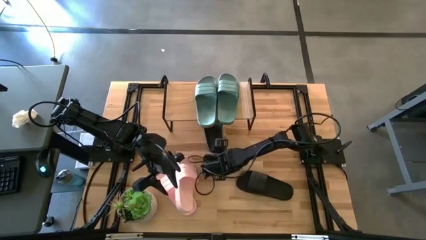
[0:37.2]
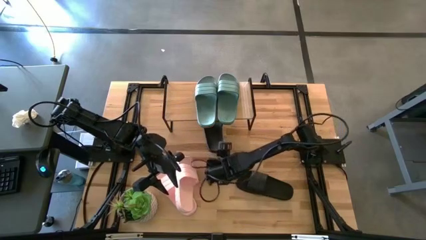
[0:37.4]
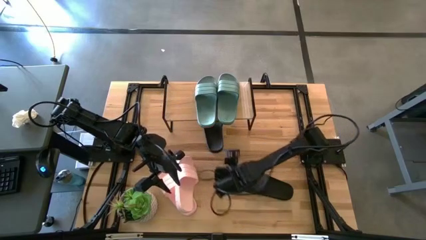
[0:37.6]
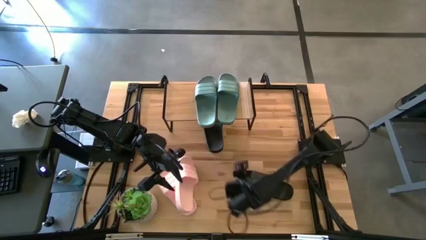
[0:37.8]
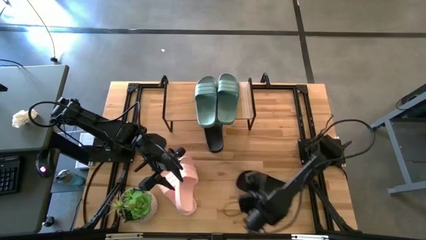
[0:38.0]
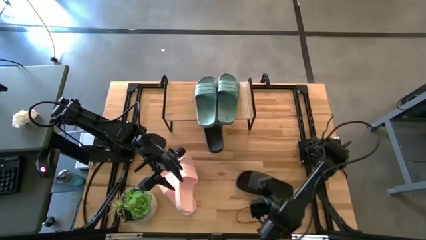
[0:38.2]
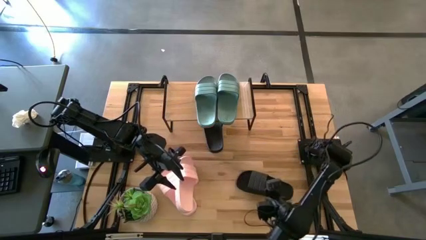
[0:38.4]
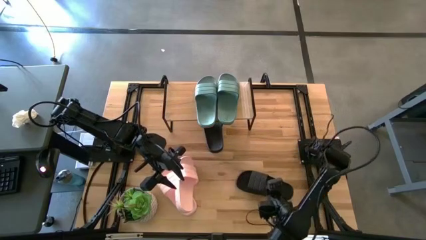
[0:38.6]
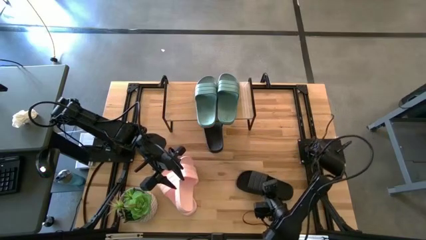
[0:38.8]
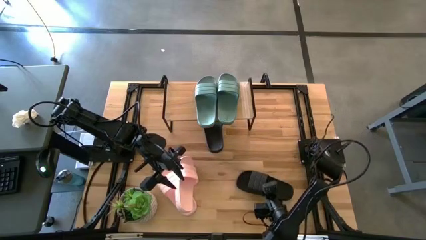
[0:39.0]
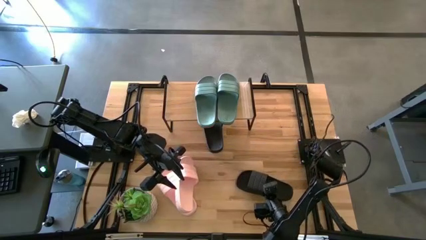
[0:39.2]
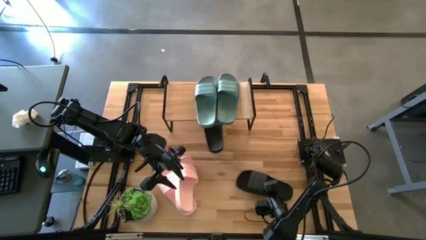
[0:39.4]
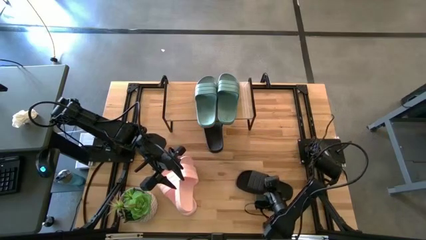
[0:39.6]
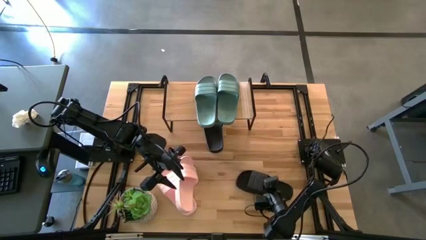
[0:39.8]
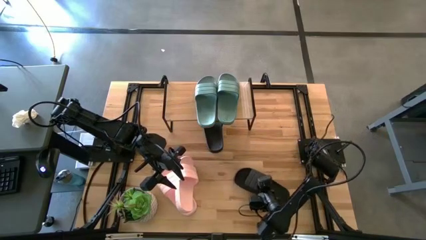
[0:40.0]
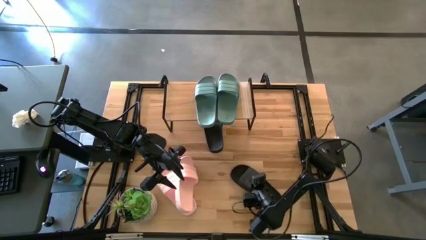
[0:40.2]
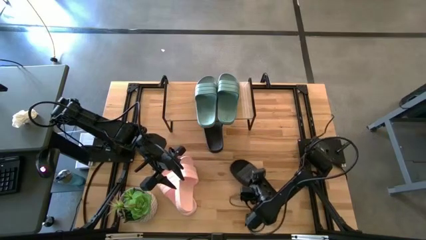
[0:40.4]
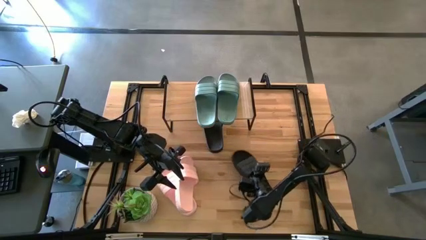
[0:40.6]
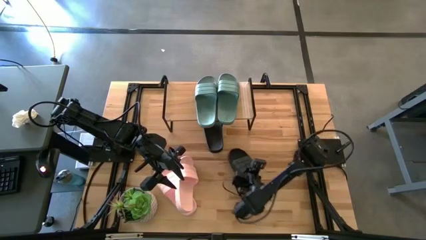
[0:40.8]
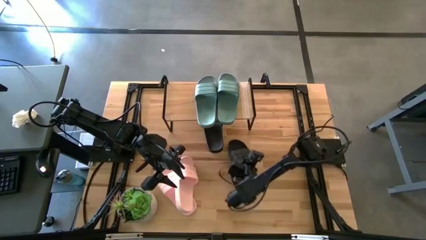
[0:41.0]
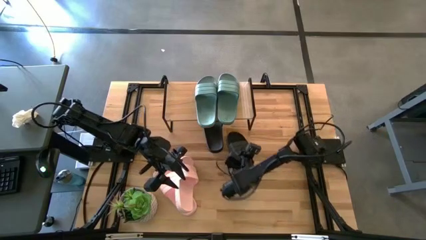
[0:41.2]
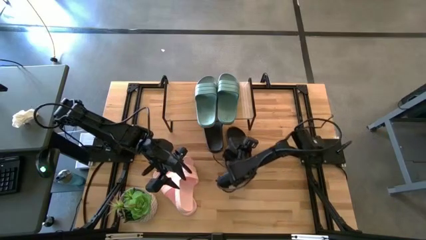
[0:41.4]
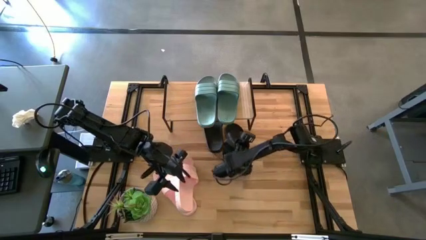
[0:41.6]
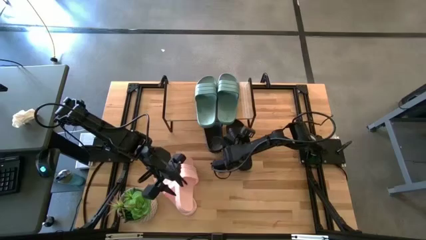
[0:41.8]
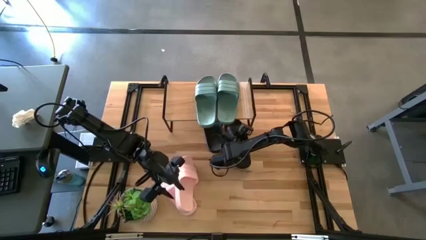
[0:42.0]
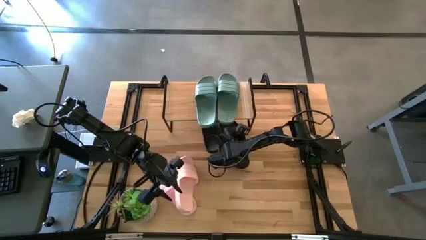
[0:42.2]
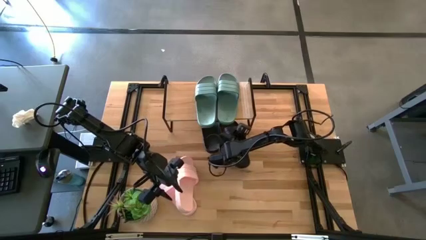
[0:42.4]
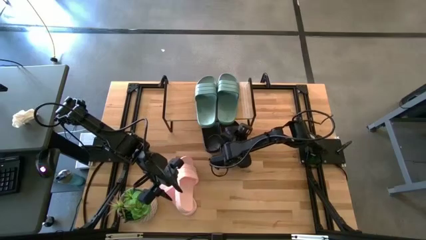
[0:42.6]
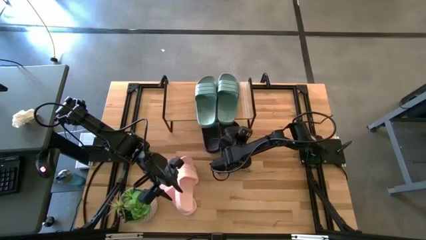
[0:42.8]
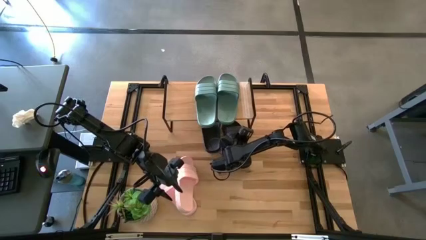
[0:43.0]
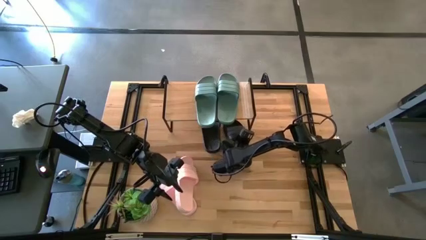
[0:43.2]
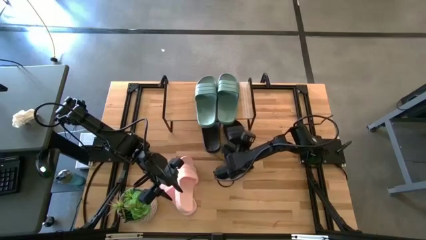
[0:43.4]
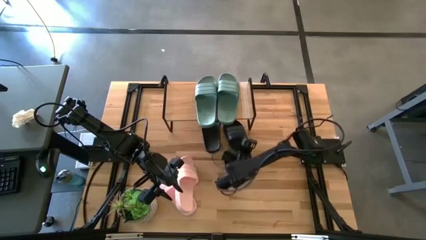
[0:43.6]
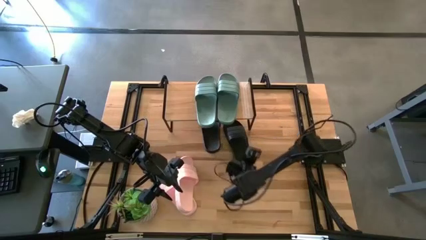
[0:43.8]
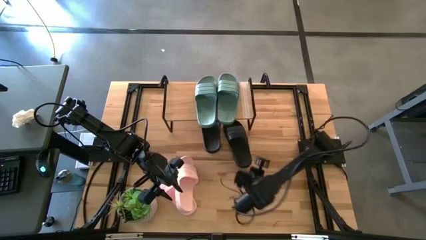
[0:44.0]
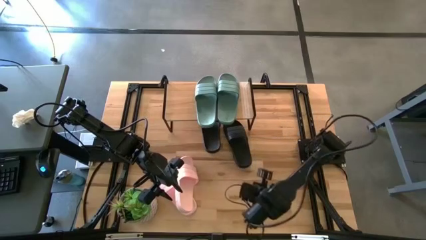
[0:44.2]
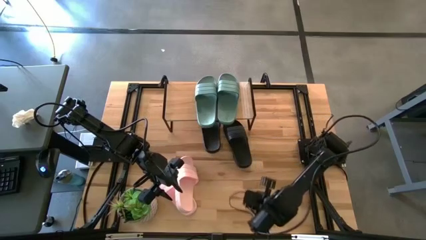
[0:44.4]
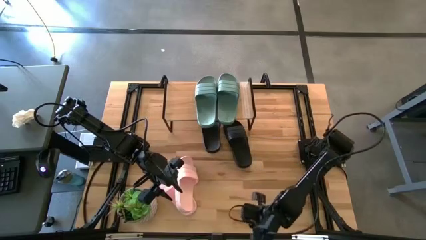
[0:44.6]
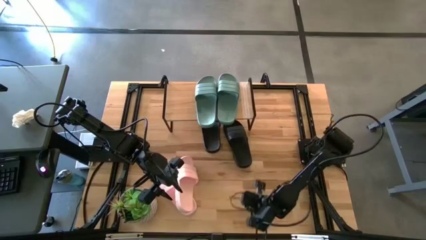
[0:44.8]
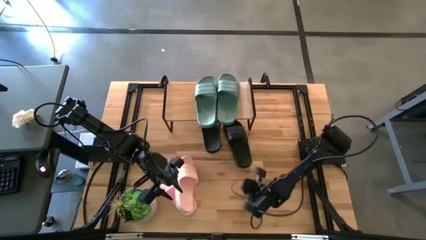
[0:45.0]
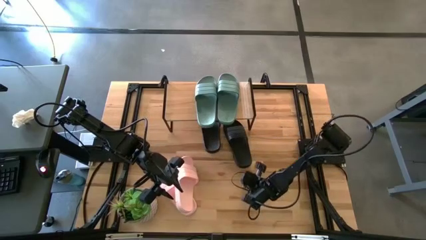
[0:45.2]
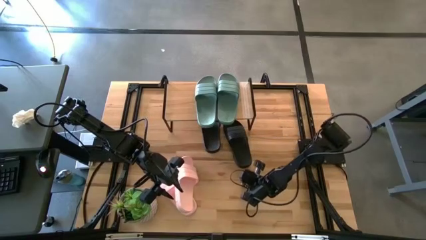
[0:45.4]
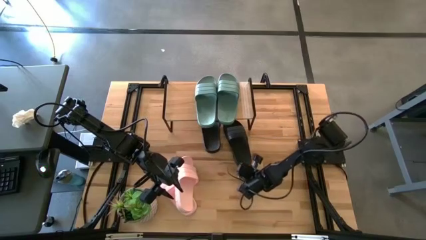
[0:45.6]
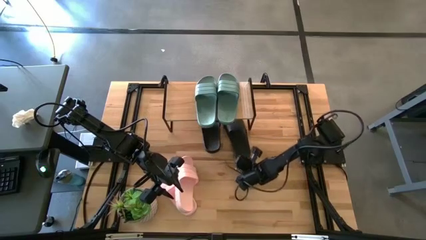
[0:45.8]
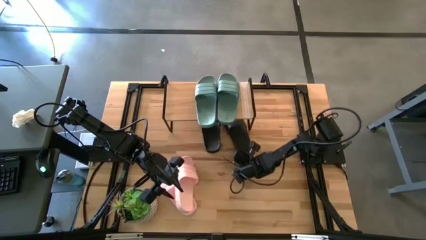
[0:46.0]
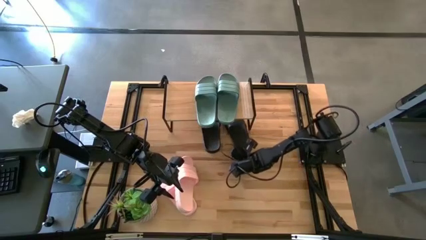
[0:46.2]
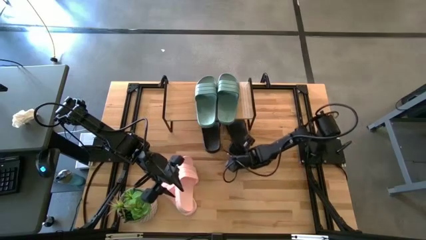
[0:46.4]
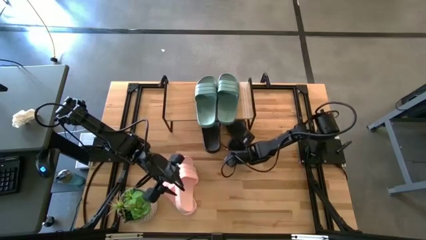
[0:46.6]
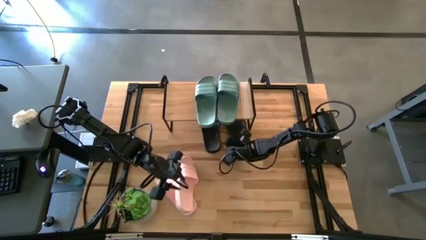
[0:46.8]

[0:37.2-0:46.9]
Task: Pick and place slides into the shelf
Put the black slipper under the shelf

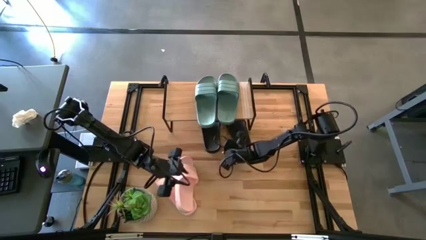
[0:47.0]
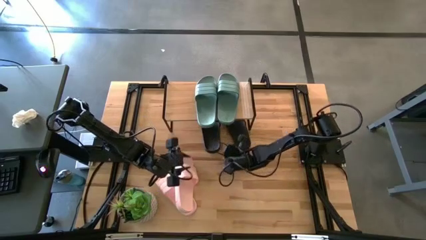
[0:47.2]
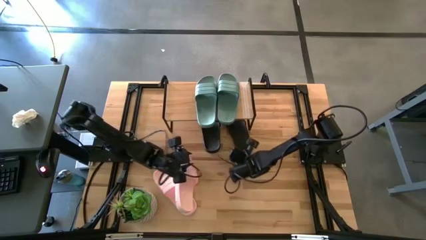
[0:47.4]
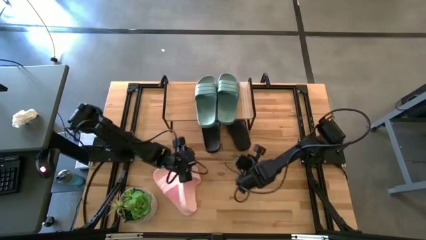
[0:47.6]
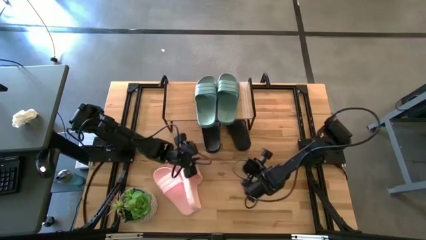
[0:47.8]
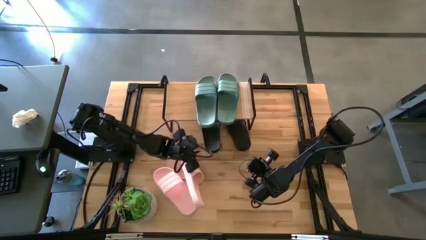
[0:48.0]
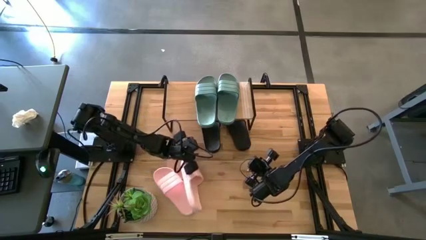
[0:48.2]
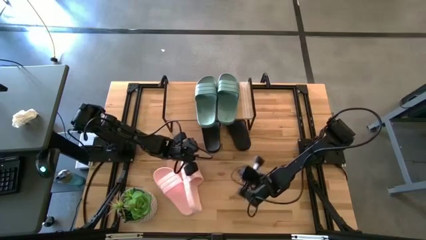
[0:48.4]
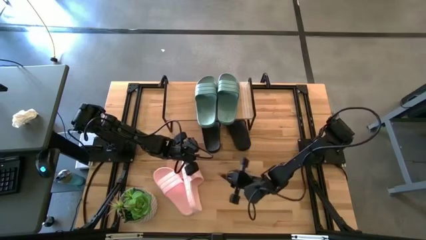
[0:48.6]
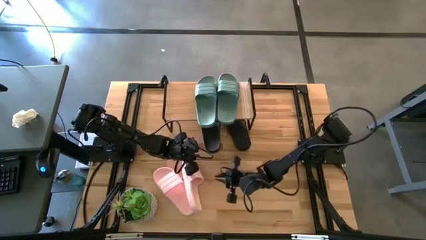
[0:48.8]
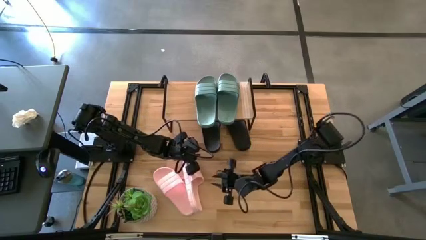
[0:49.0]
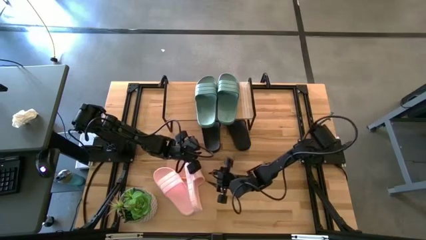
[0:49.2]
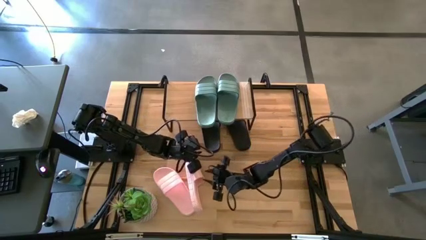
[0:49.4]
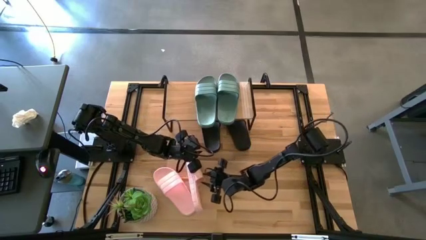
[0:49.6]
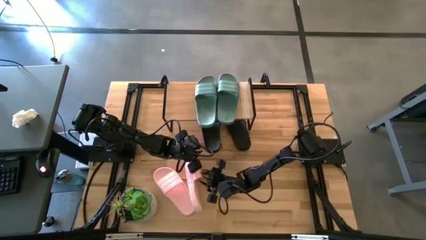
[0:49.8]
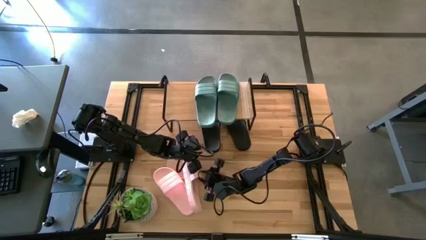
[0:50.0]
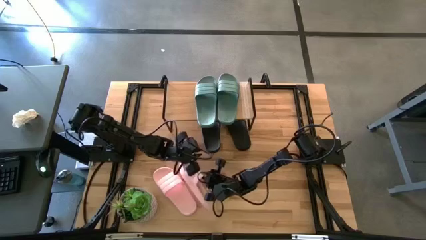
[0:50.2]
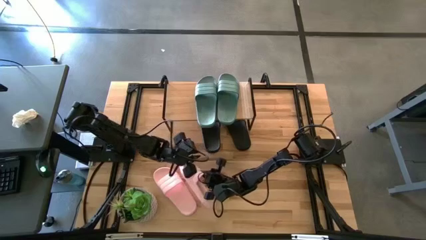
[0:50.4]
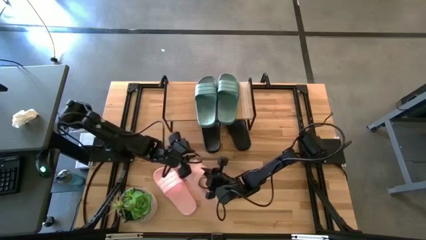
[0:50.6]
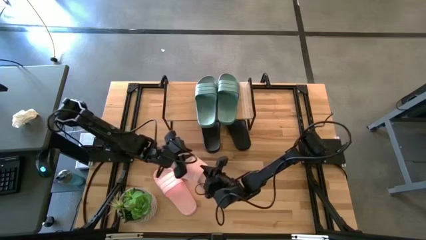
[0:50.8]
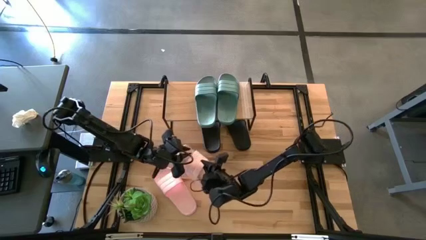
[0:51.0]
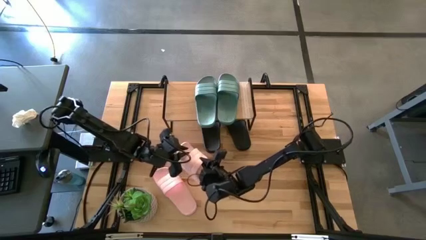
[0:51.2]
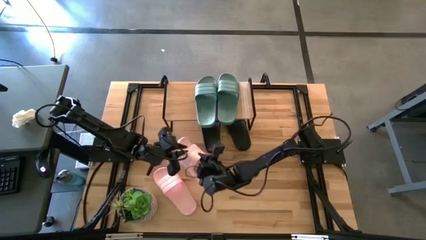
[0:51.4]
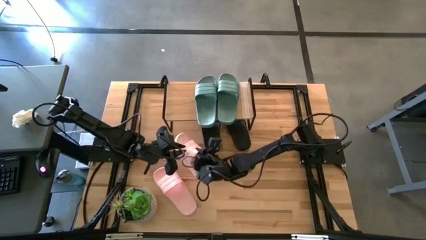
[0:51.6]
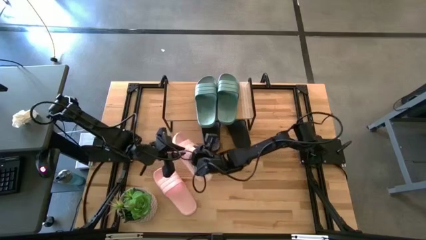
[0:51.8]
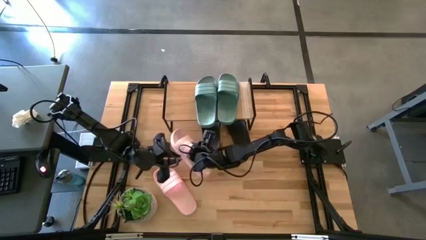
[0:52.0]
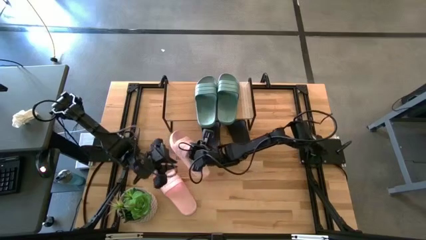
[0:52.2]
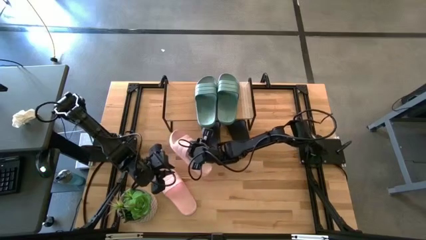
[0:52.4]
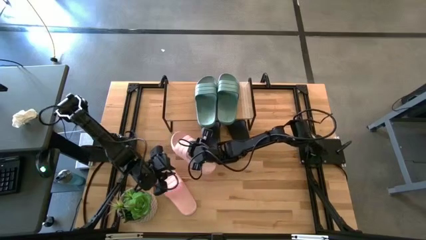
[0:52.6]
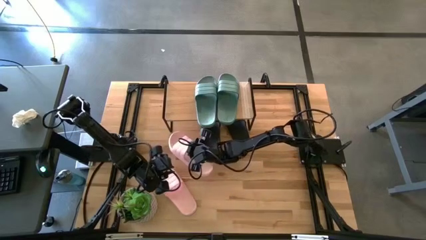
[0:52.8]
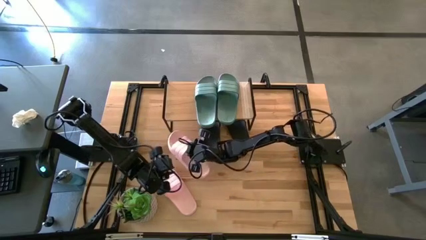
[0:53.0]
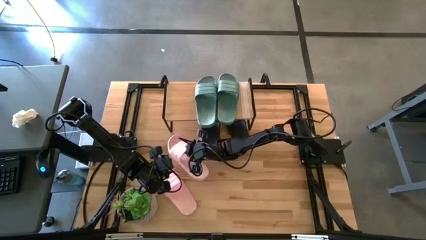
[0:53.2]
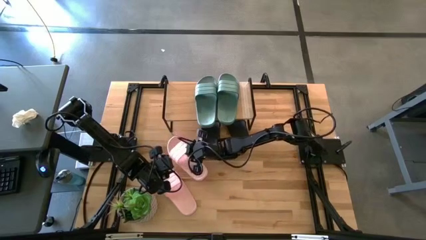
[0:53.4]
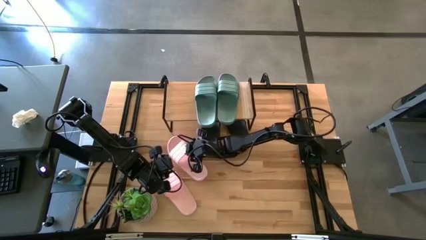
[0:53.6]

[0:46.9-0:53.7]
Put the right pink slippers under the shelf
